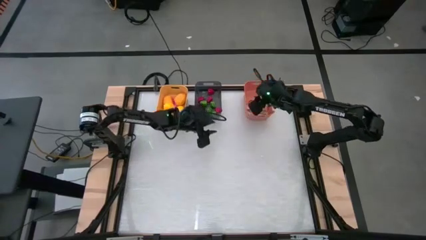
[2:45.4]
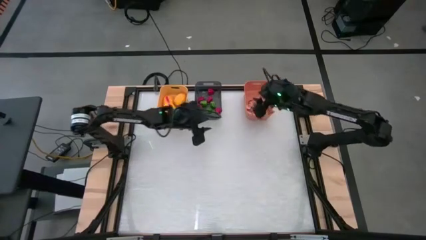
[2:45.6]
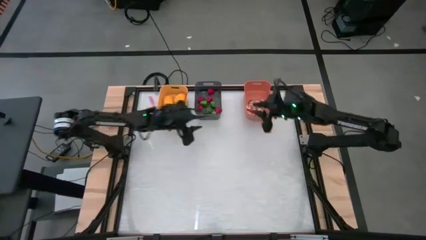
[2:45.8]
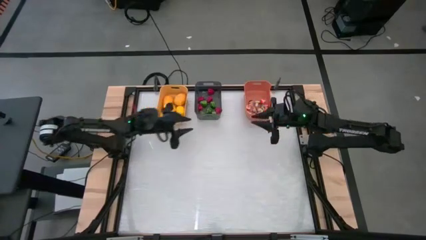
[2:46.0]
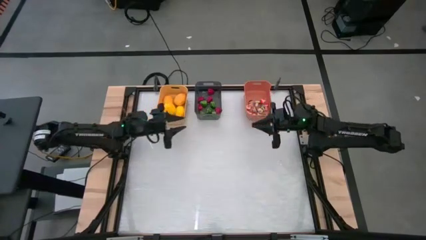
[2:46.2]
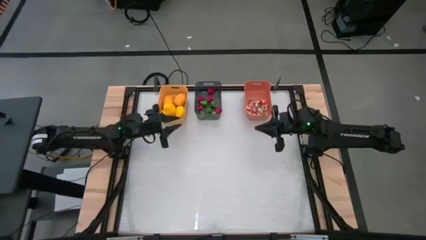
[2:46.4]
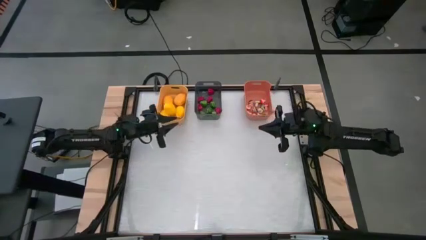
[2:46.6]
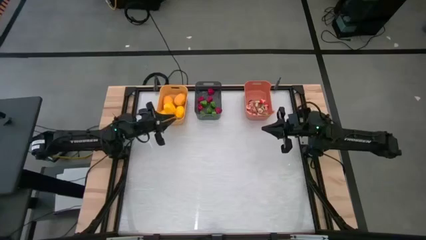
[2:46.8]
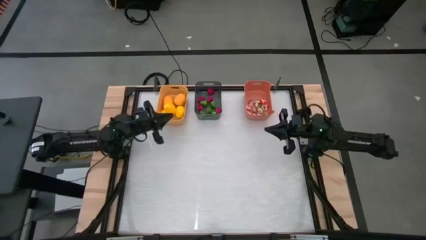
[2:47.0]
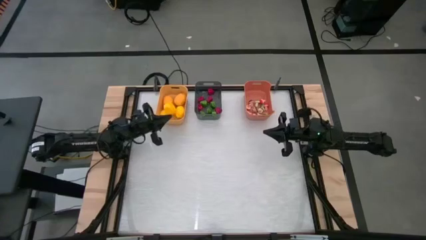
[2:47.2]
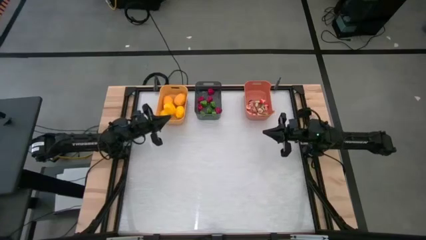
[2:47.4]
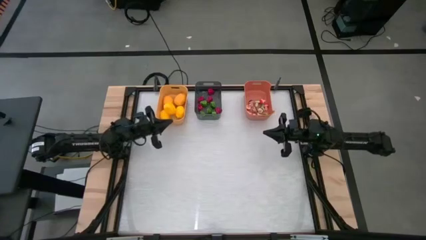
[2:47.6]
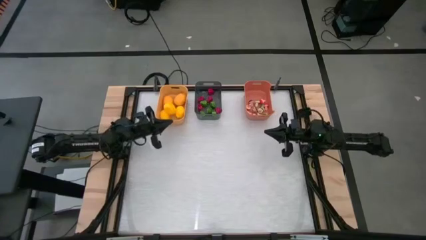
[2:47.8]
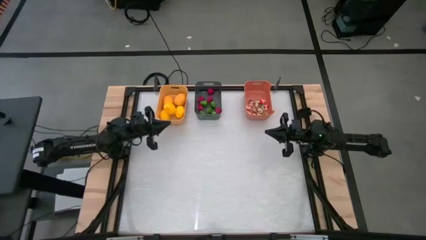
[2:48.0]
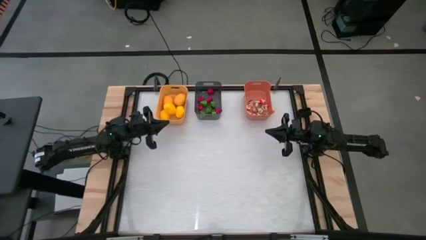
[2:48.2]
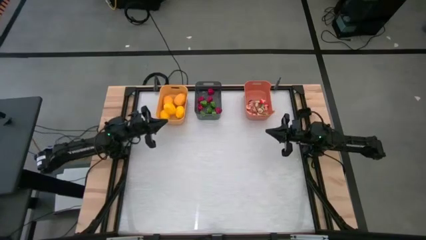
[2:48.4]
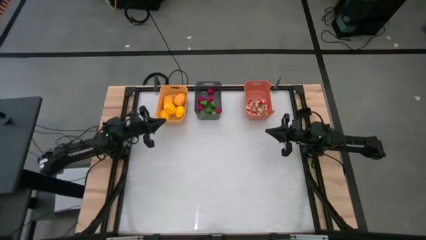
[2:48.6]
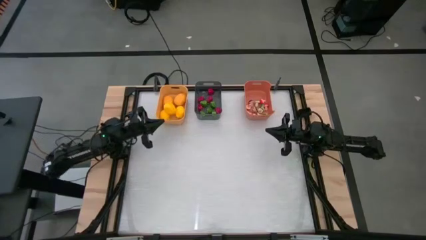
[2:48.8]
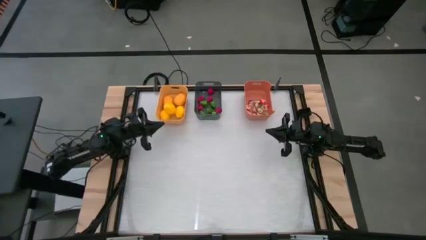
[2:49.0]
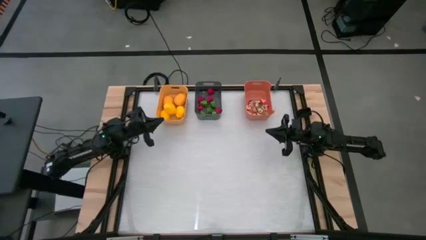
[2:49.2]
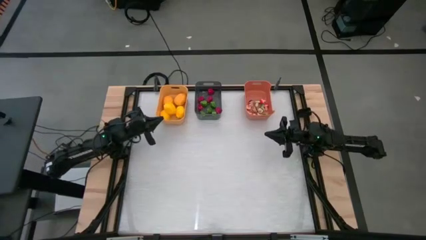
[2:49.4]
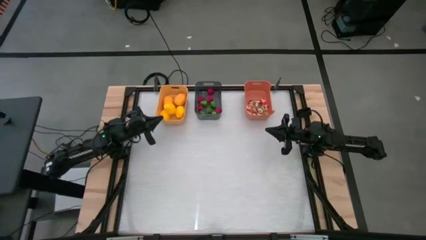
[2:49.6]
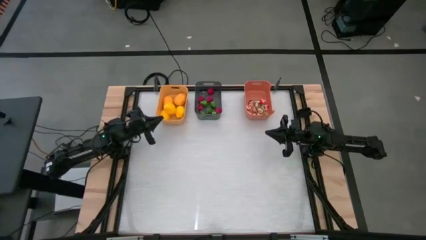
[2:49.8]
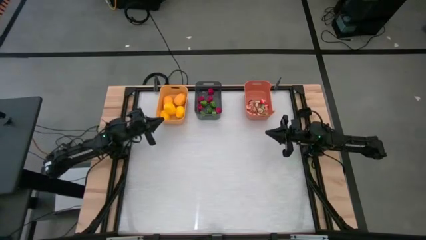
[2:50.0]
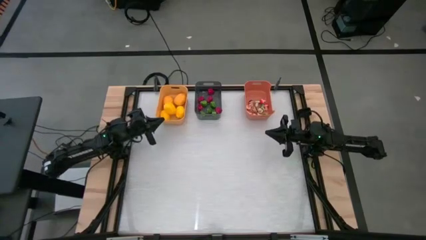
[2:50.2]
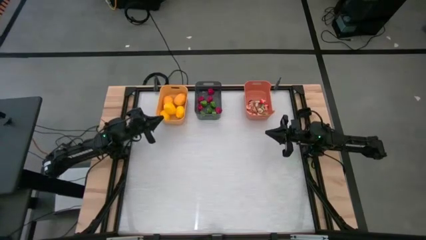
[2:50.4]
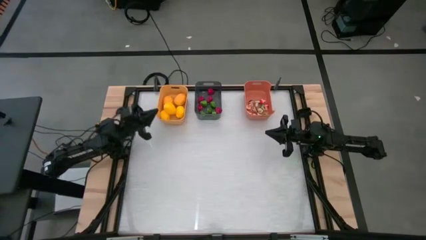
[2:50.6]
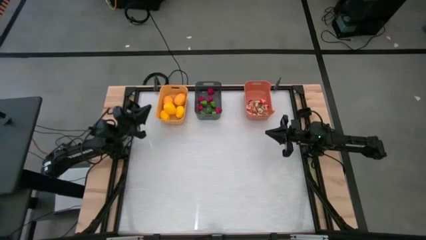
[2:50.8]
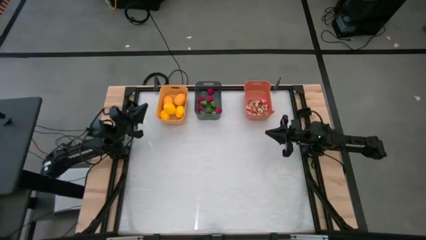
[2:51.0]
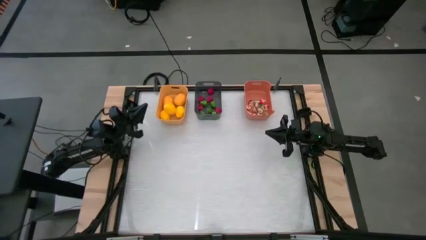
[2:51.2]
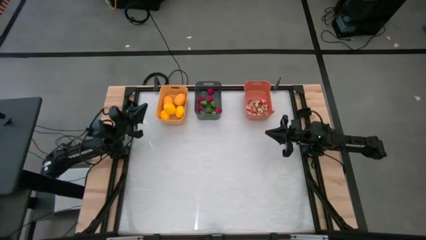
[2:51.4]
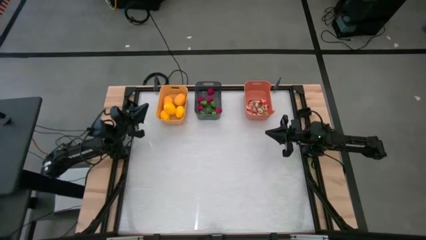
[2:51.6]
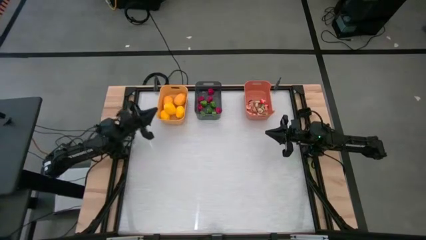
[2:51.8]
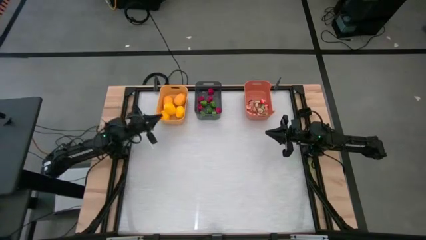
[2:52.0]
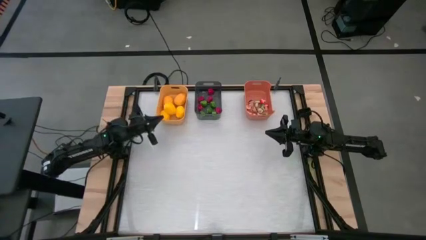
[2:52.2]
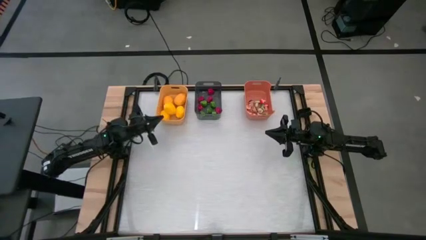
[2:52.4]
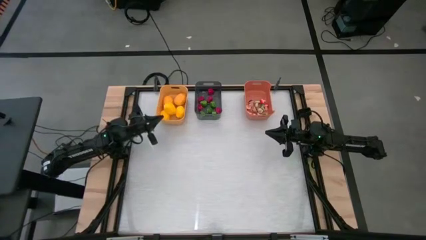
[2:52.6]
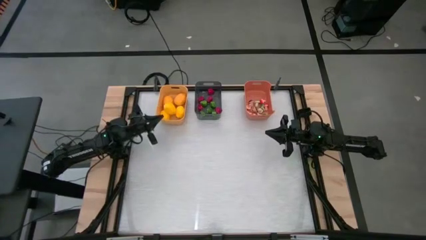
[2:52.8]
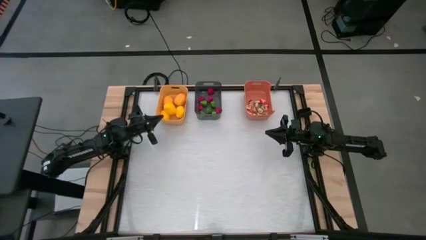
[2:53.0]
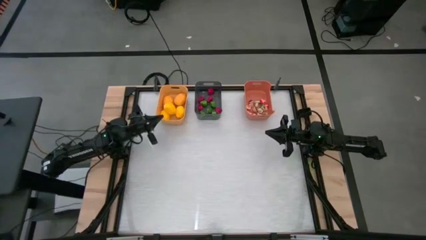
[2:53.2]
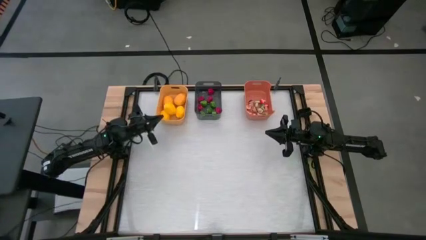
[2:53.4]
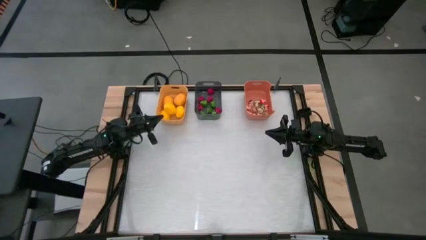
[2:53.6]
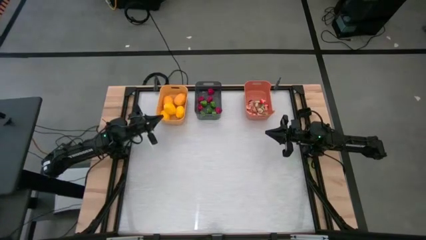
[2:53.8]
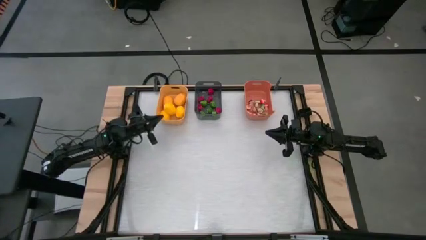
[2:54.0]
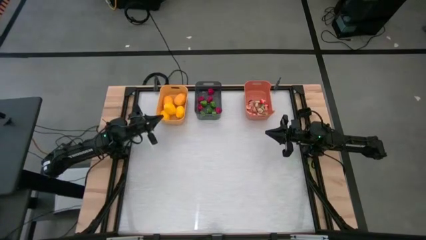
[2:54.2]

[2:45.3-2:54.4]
Task: Sort produce into baskets
Return to Home Position

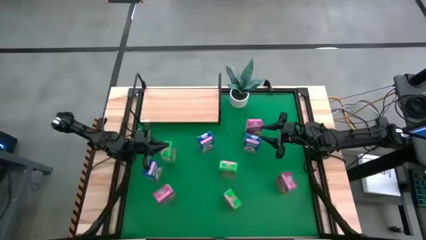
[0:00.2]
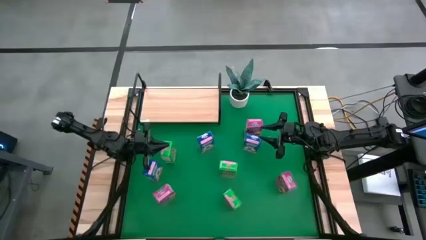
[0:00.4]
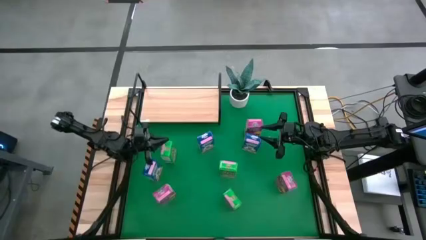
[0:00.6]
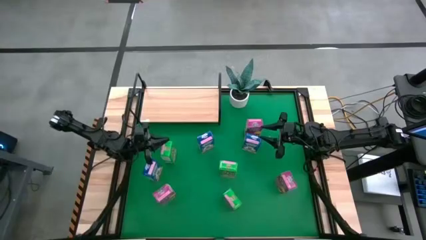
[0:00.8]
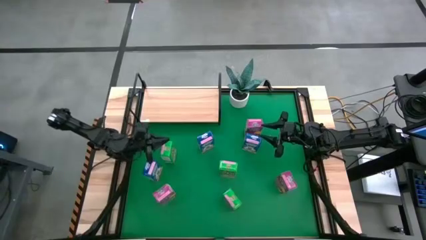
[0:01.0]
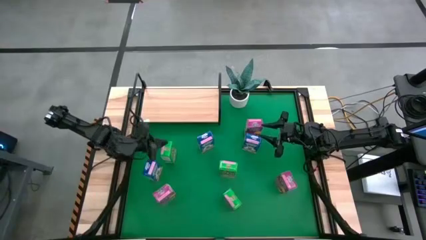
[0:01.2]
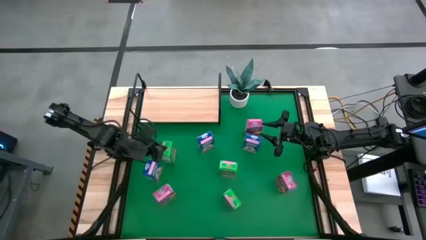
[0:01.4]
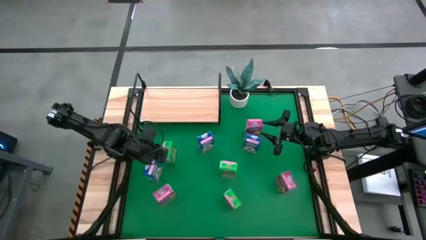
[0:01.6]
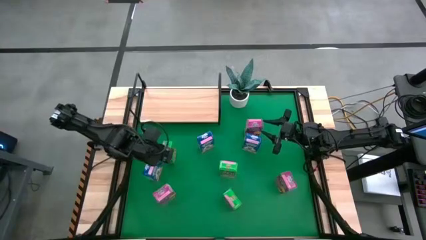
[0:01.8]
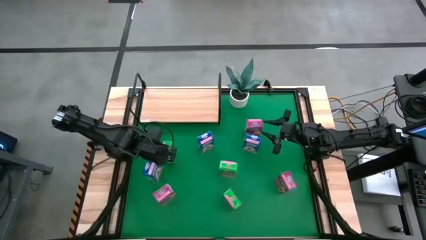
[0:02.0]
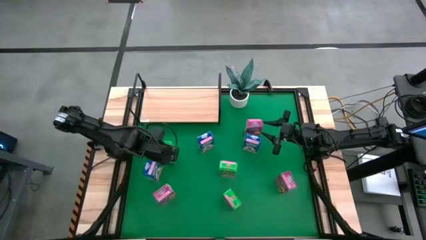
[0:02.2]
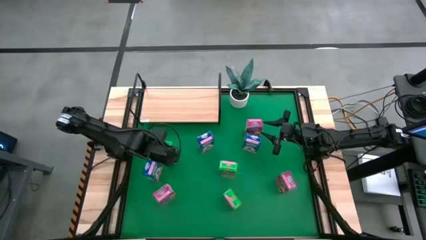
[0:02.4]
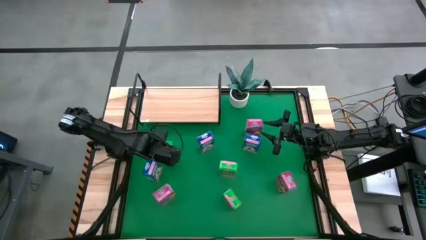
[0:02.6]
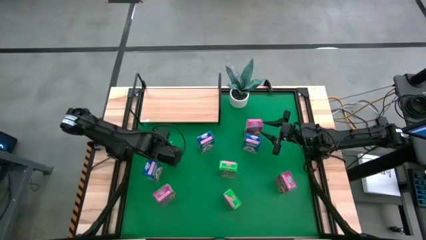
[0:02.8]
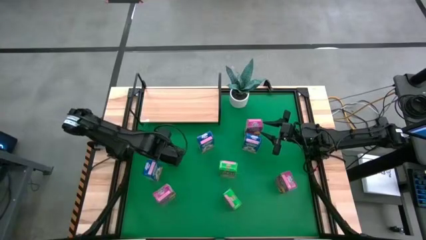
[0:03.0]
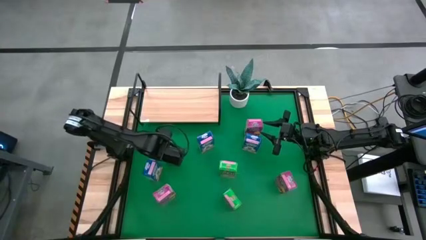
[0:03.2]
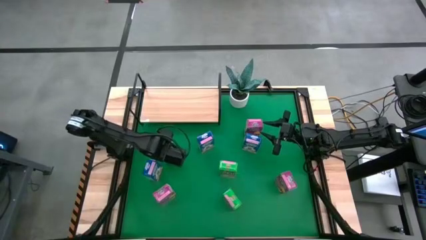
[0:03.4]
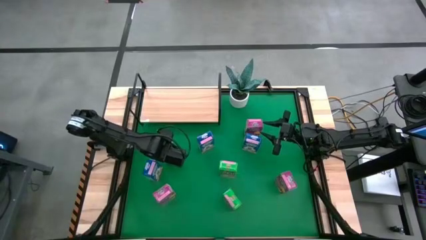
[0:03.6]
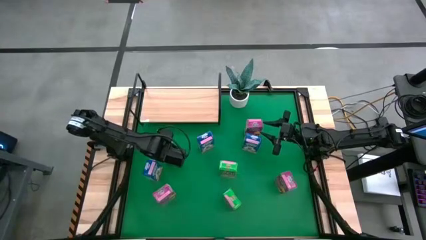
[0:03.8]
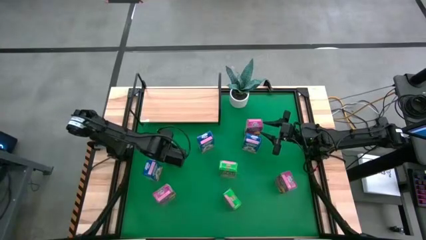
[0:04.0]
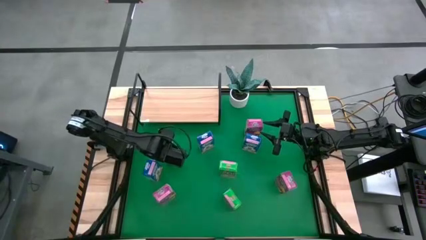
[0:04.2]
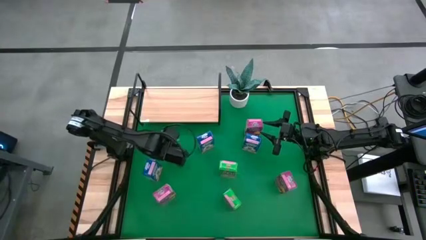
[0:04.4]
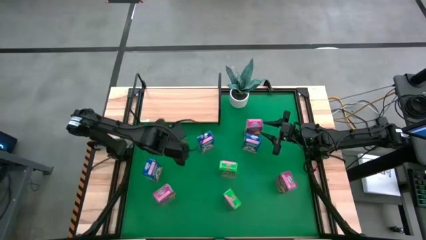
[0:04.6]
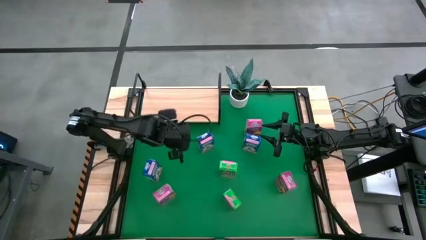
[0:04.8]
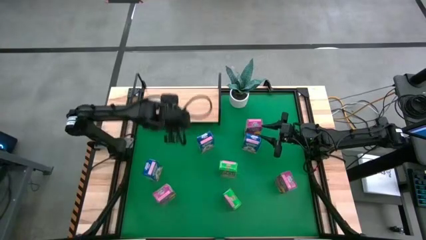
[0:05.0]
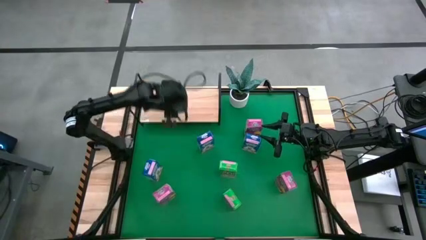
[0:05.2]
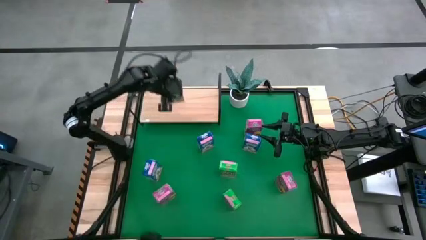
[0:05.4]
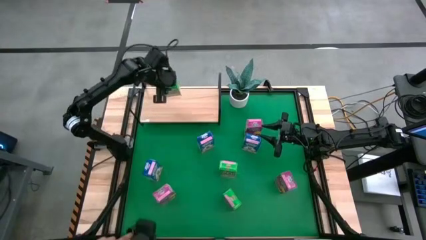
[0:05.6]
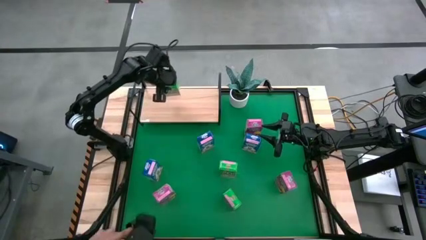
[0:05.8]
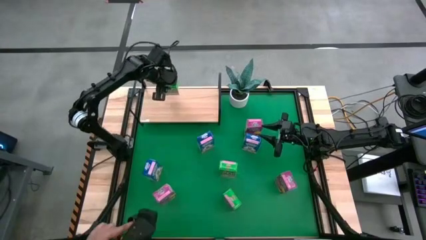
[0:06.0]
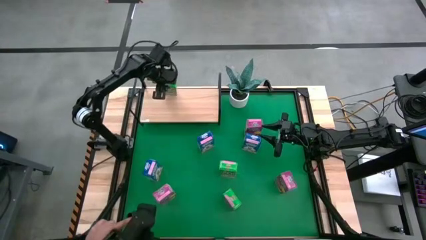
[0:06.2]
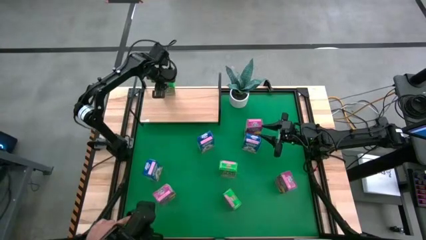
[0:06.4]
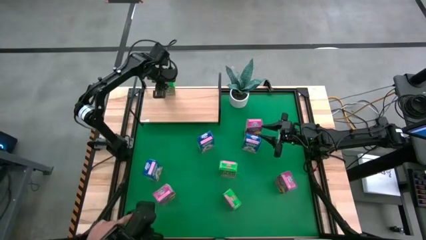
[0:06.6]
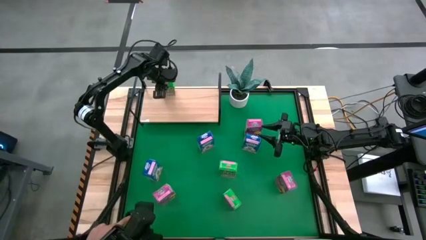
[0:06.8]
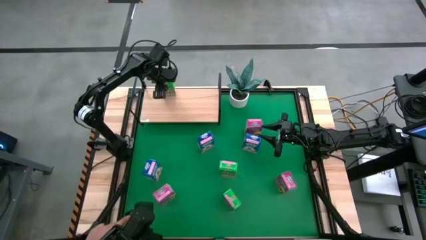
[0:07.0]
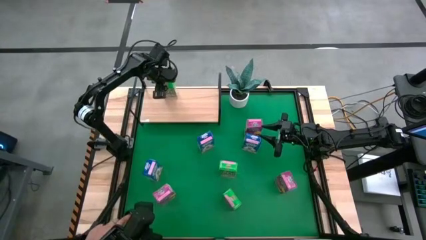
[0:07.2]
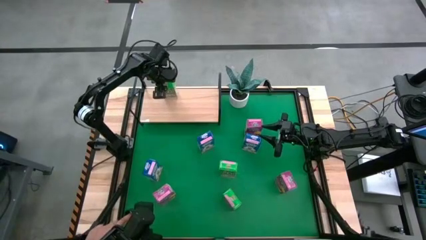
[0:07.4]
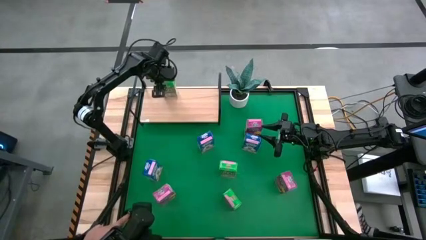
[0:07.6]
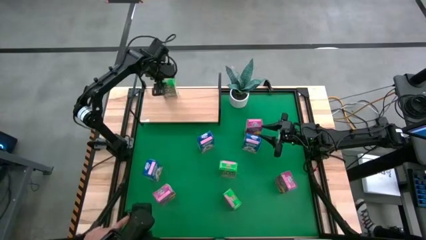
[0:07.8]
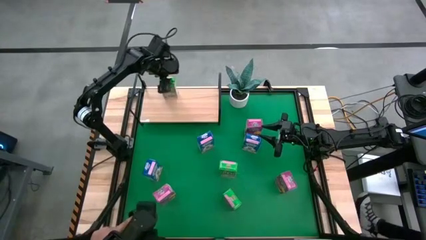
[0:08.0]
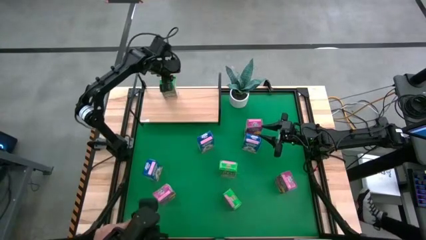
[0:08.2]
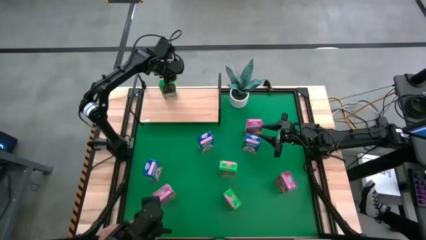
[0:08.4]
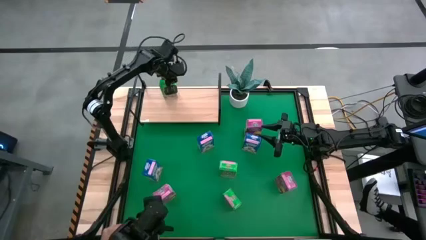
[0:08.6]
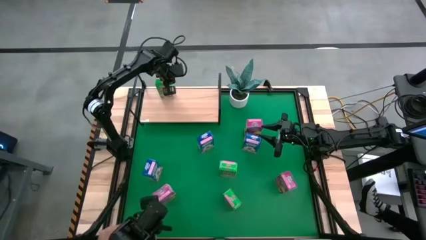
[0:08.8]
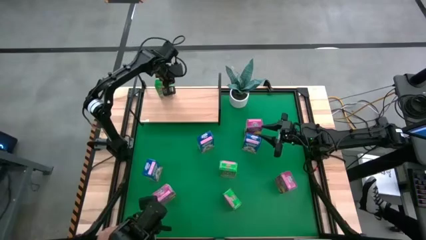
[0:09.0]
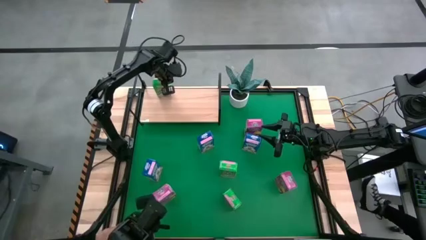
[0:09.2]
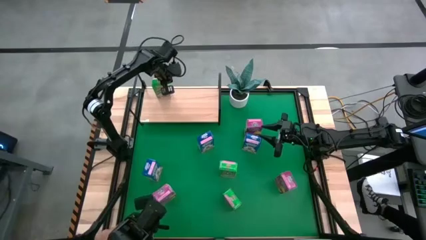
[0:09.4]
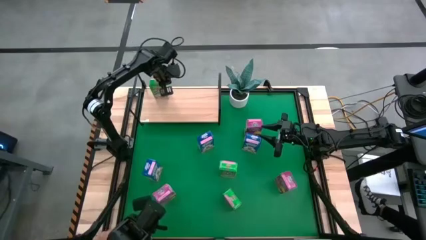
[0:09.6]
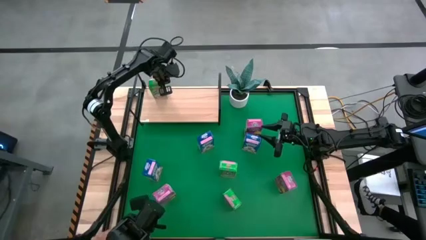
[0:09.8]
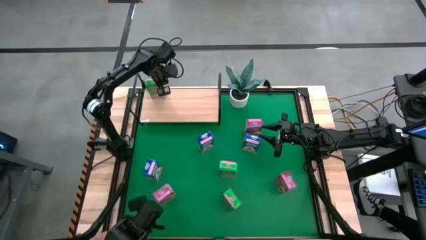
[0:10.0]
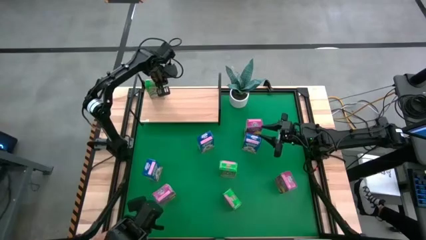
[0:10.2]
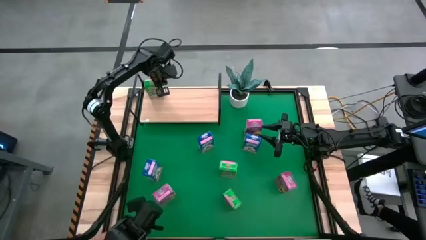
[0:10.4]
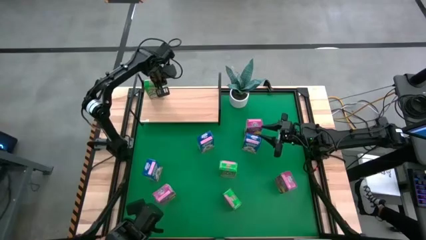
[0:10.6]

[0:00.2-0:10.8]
Task: Stack cereal on shelf
Put the top left green cereal box on the shelf
